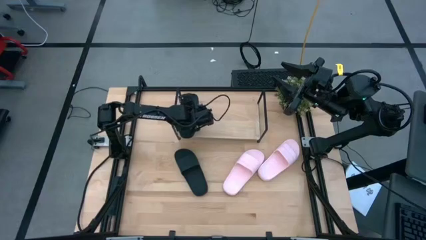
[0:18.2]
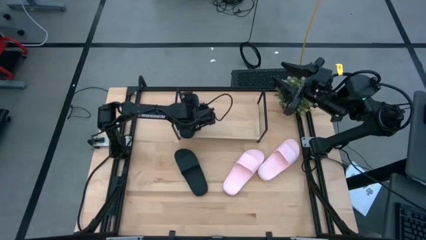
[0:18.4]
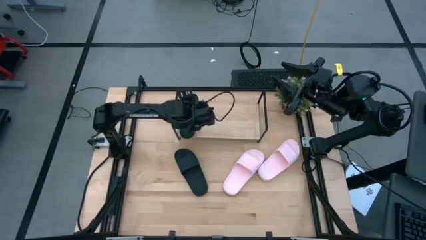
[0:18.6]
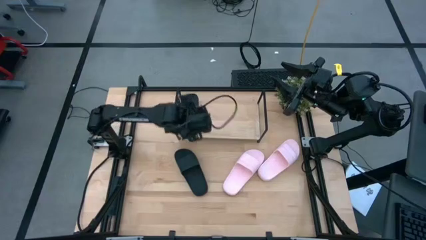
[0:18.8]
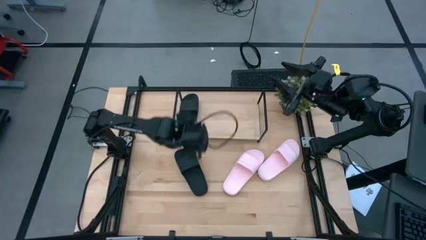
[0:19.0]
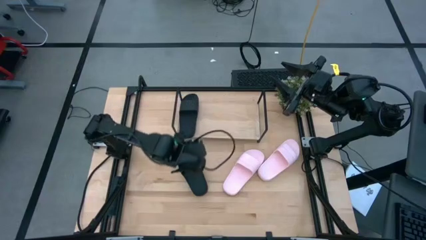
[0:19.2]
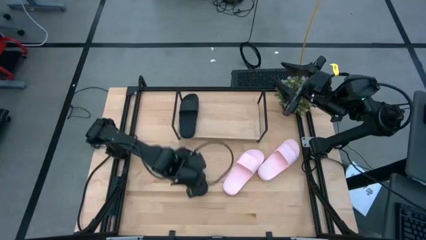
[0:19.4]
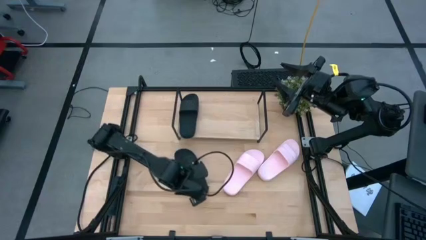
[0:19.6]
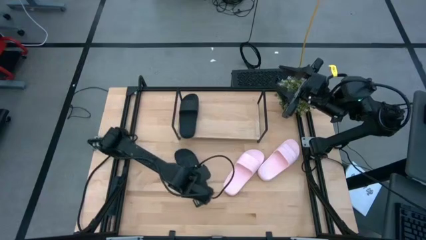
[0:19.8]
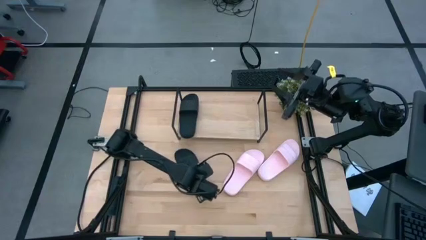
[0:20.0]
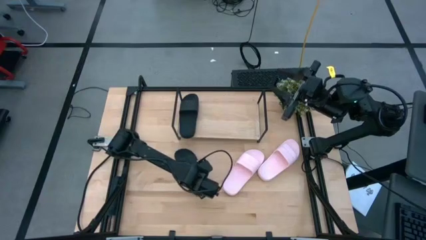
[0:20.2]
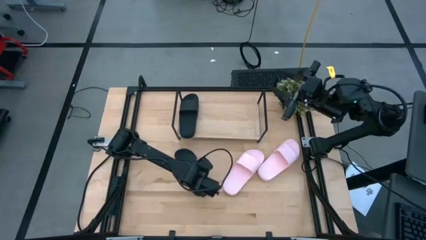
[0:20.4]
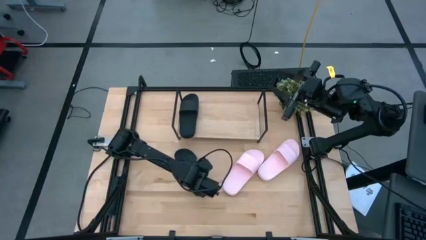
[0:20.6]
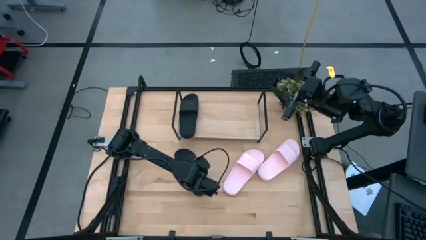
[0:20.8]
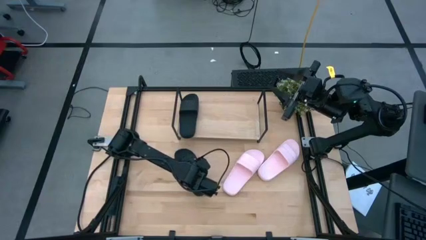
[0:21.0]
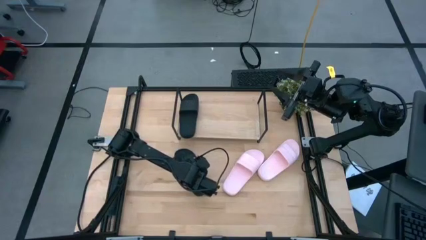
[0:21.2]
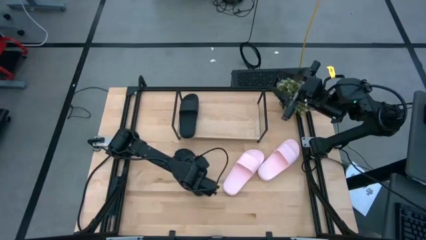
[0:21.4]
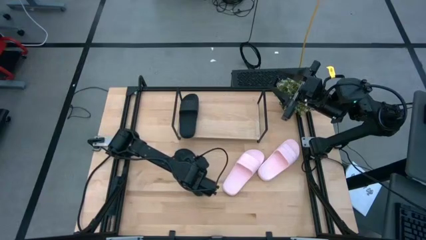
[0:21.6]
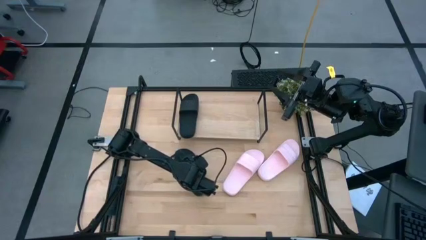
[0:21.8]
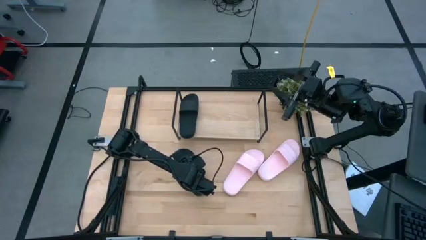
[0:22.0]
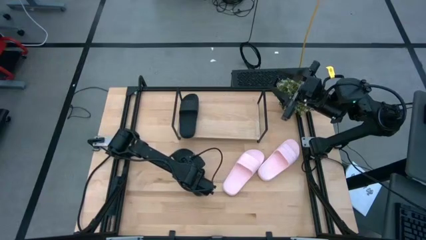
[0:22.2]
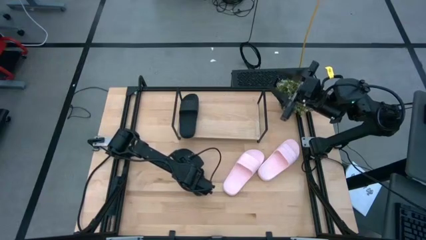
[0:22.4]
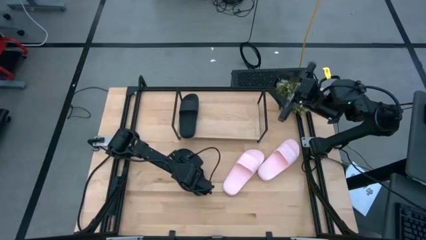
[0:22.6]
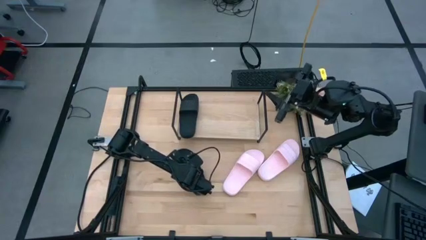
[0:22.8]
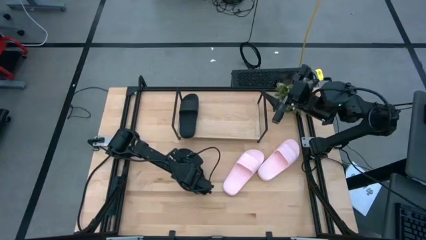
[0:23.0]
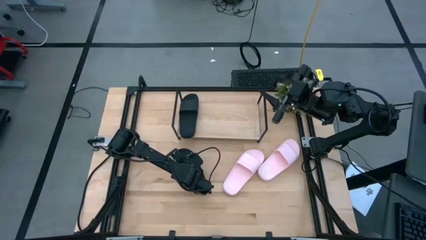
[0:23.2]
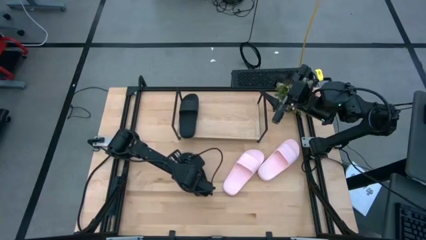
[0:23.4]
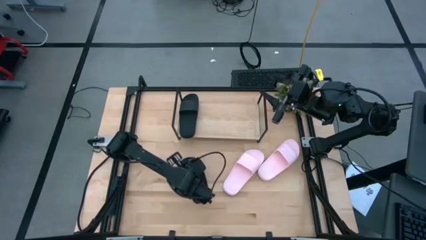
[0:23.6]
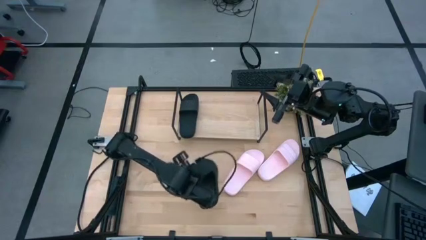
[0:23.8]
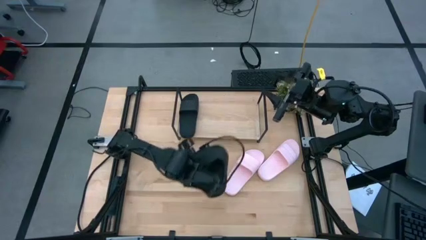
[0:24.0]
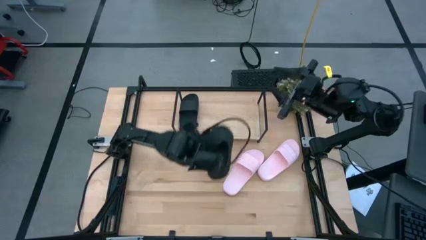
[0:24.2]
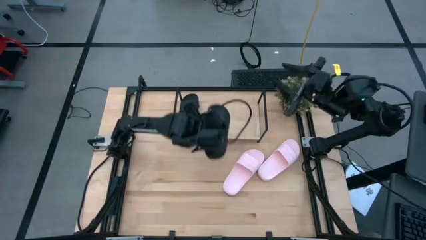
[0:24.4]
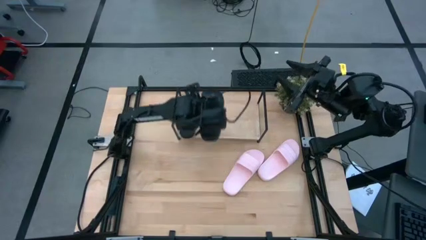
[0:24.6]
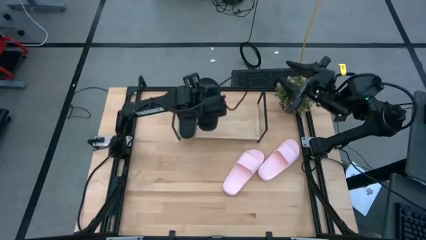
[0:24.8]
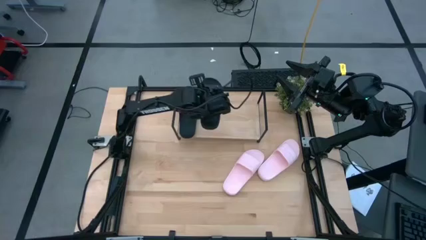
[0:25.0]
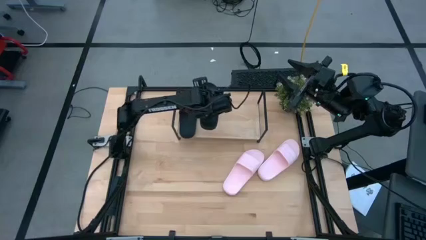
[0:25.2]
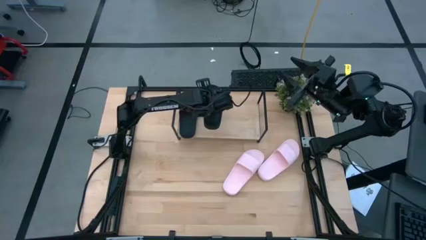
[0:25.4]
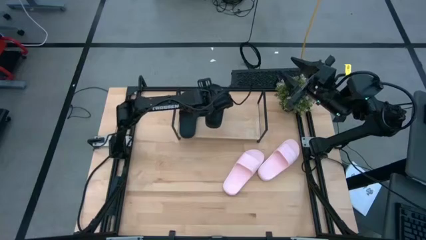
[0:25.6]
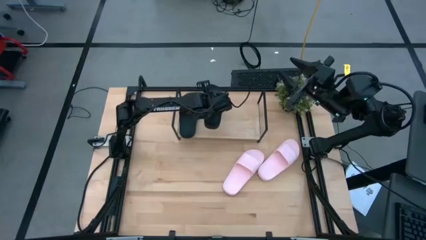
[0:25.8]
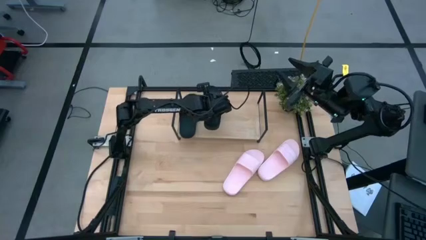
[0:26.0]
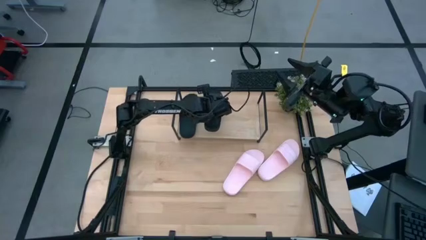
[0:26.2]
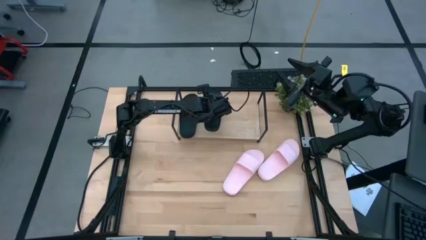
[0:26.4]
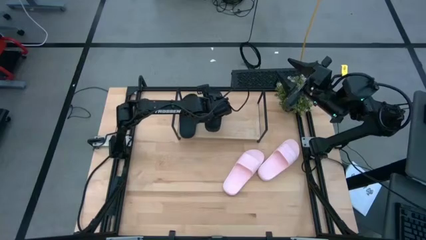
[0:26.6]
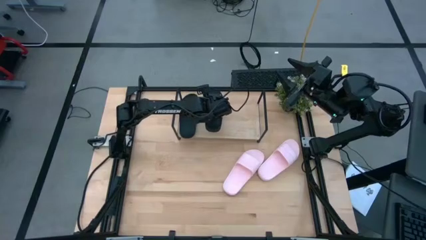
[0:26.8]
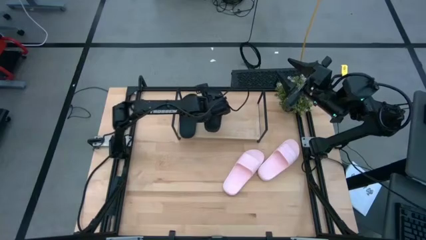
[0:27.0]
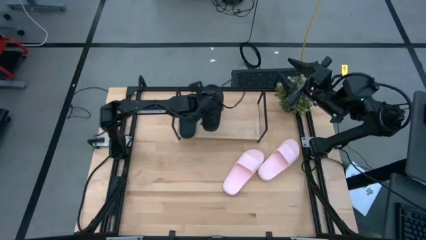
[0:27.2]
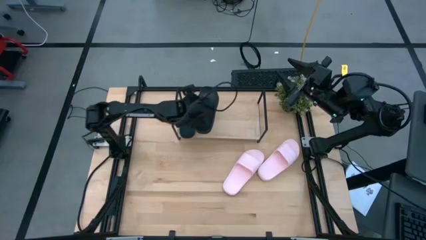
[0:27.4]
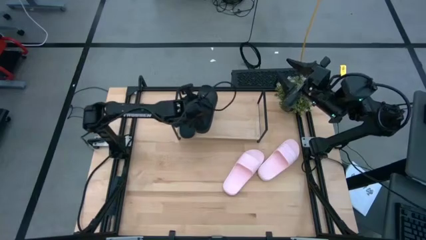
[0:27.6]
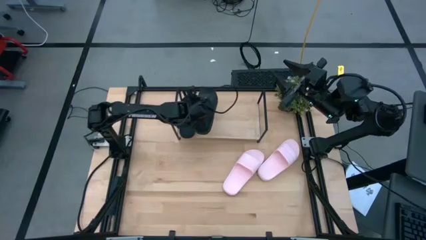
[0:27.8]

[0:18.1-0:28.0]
Task: Pick and place slides into the shelf
Put the black slipper on the shelf

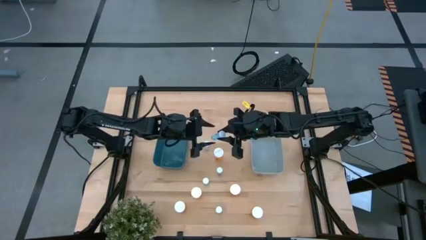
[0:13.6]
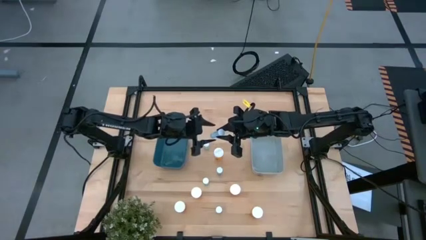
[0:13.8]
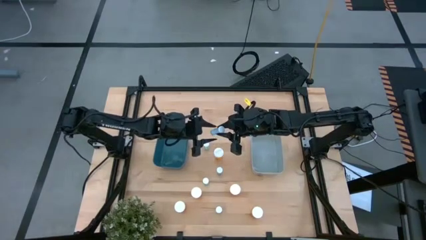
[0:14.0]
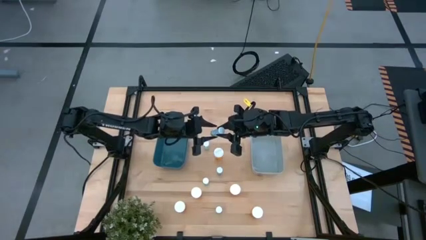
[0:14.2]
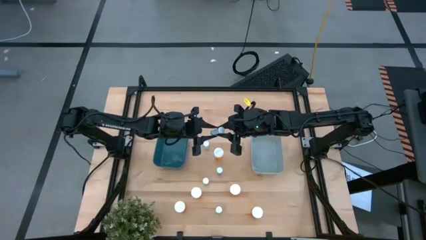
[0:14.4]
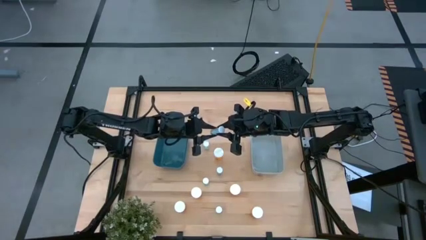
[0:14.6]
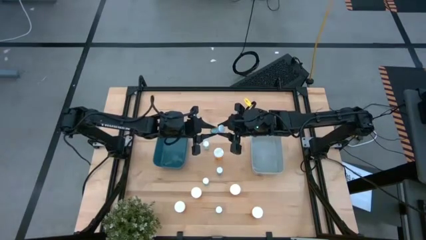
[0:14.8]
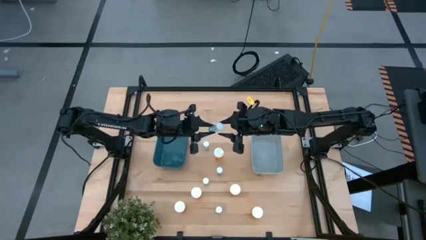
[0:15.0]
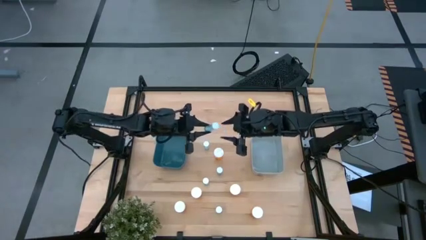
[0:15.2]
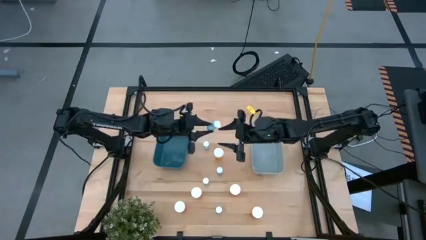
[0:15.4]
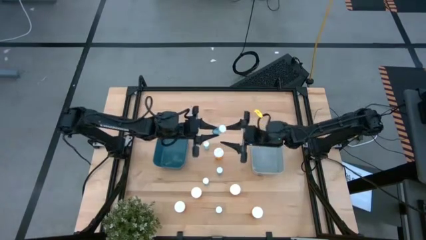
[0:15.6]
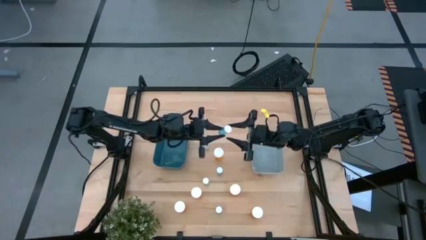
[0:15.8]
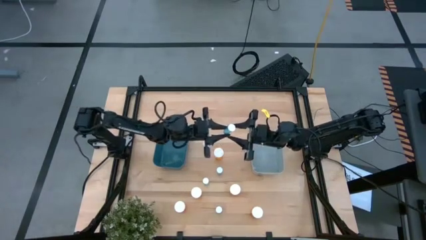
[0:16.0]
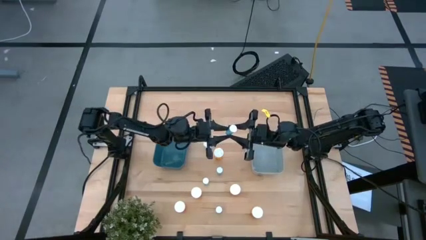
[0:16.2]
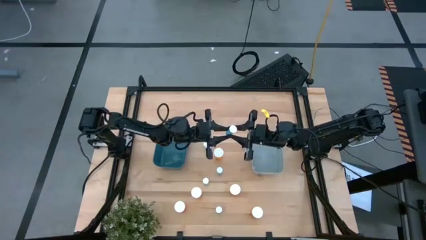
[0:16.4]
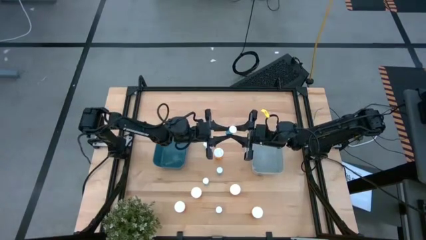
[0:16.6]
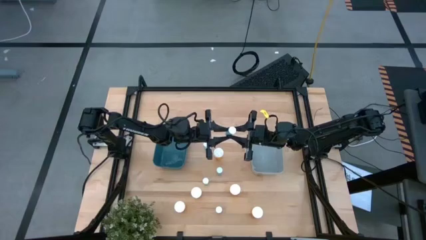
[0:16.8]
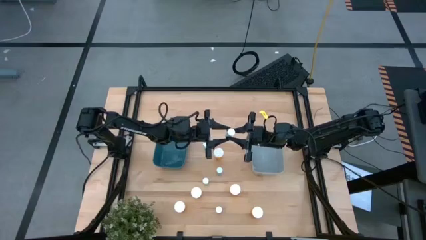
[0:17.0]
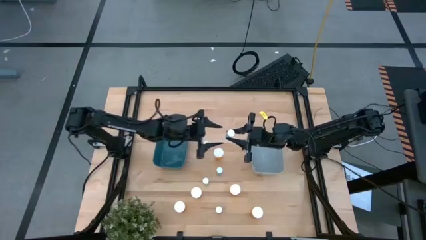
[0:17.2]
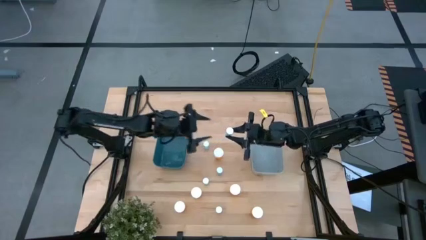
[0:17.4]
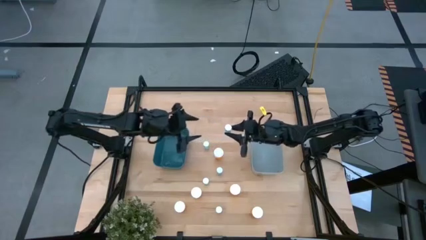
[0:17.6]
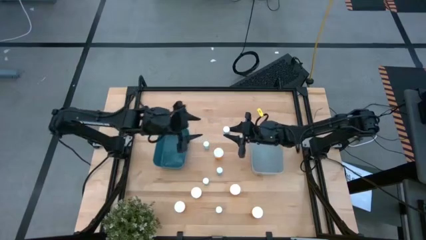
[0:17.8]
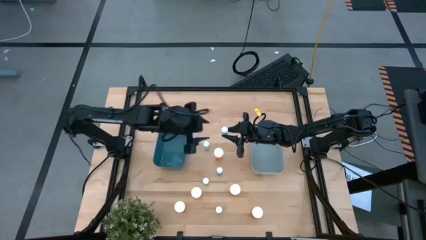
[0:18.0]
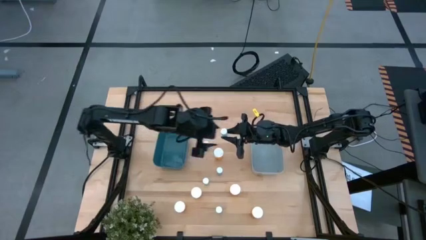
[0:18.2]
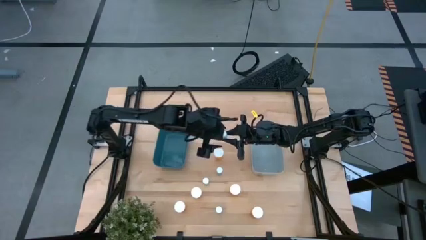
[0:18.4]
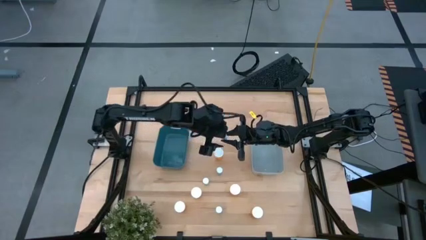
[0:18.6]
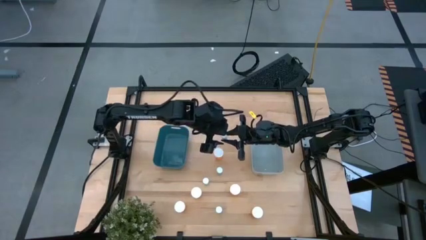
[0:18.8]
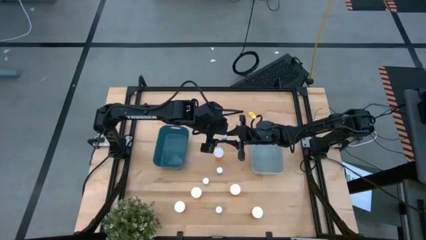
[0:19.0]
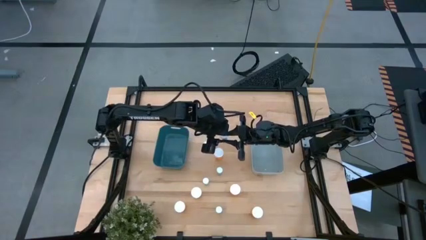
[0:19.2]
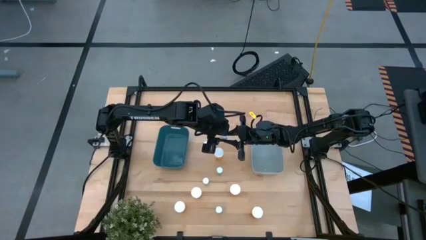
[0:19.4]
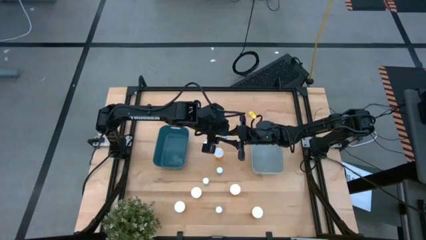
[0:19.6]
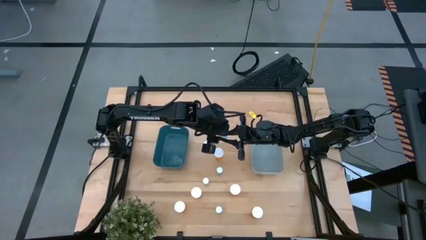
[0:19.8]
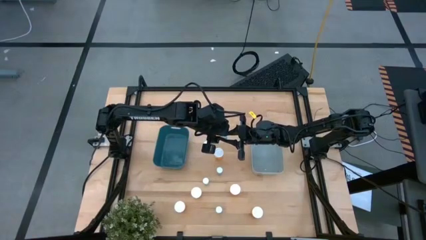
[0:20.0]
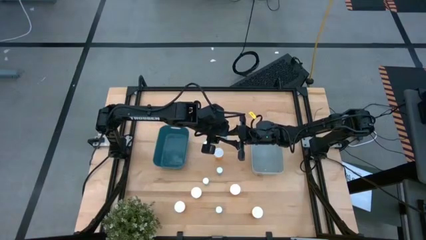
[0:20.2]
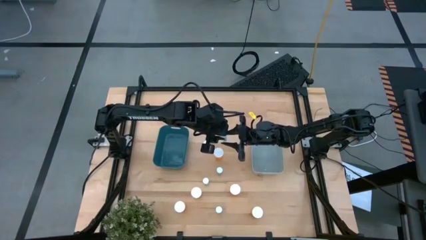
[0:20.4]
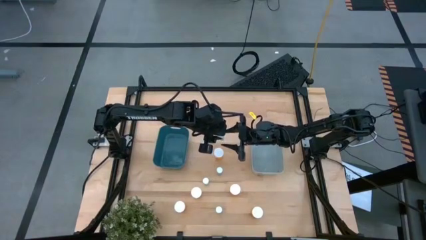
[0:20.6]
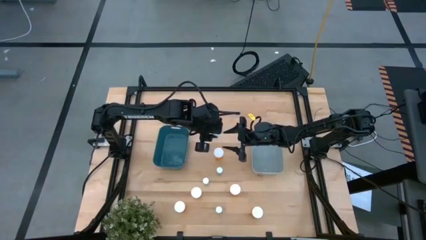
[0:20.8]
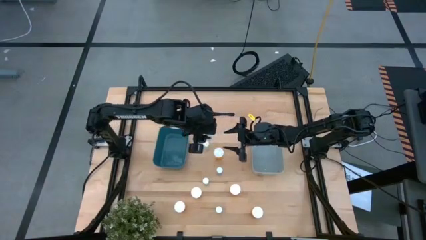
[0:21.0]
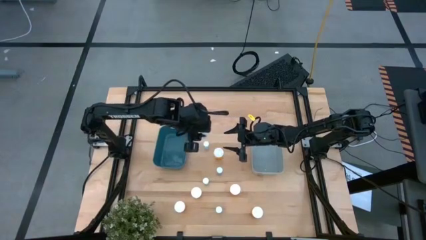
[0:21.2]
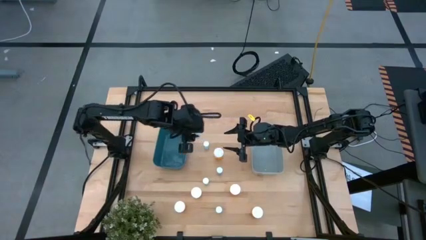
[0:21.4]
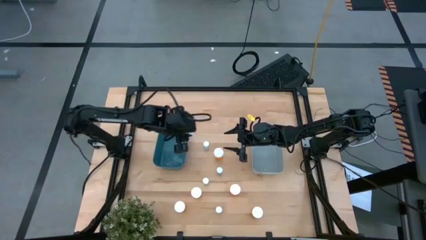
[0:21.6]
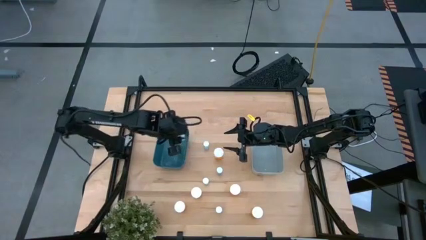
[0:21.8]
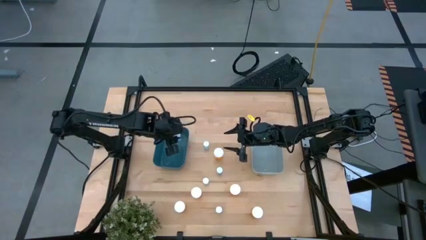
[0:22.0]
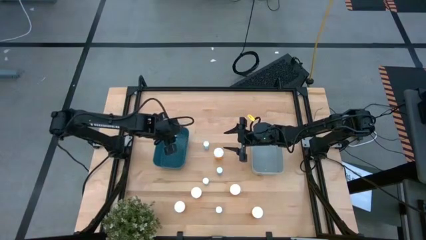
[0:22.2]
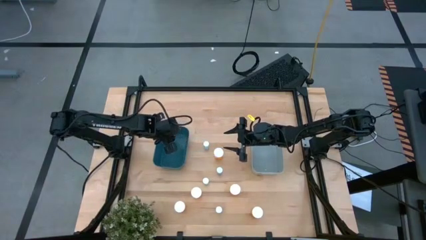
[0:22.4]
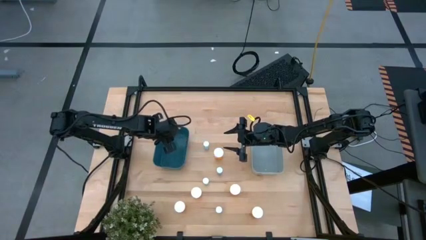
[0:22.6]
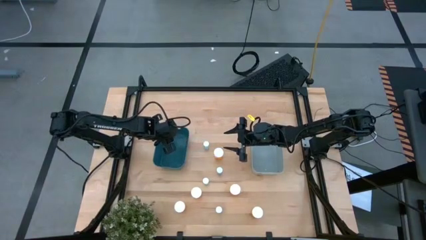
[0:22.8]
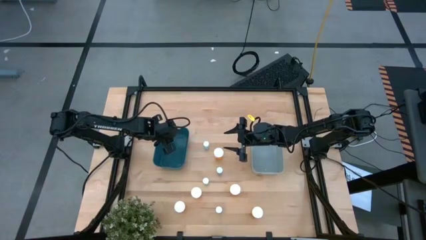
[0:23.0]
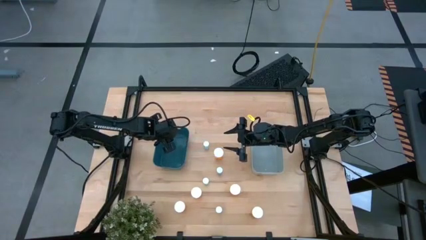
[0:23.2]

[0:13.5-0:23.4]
Task: Pick and place medicine bottles into bin by pill shape (circle, oval)
Put the blue pill bottle into the blue bin
